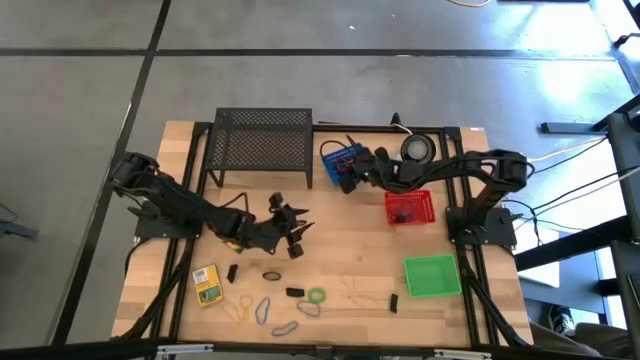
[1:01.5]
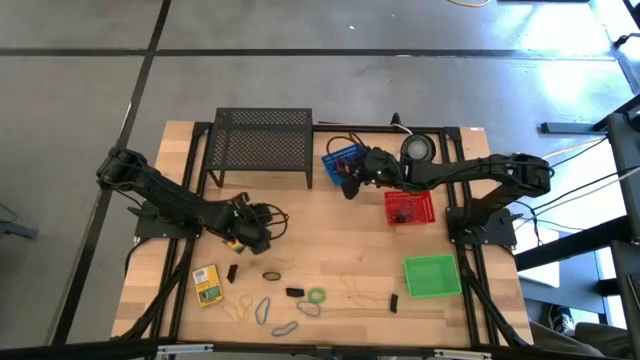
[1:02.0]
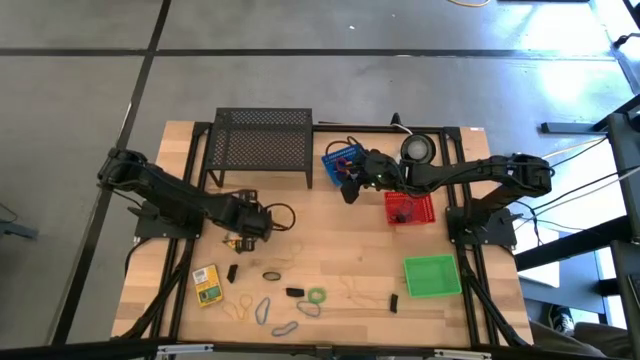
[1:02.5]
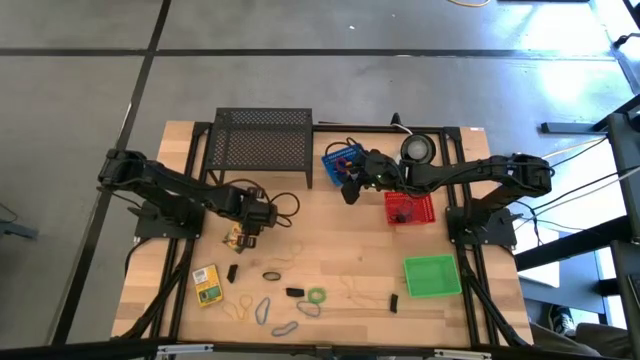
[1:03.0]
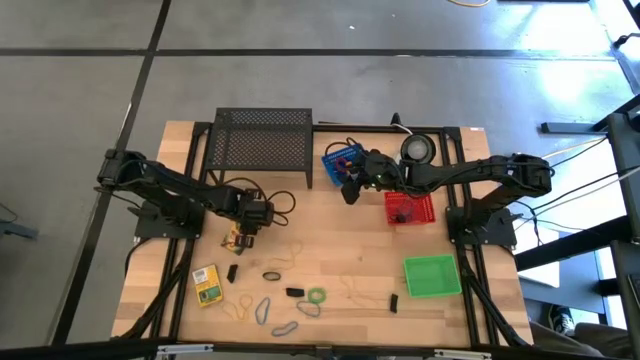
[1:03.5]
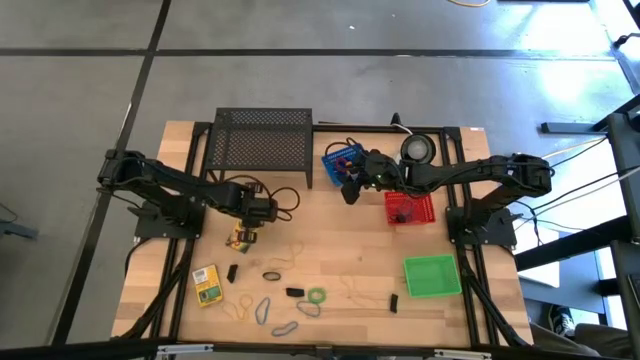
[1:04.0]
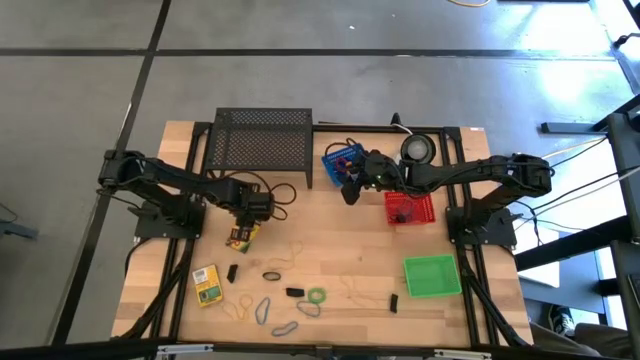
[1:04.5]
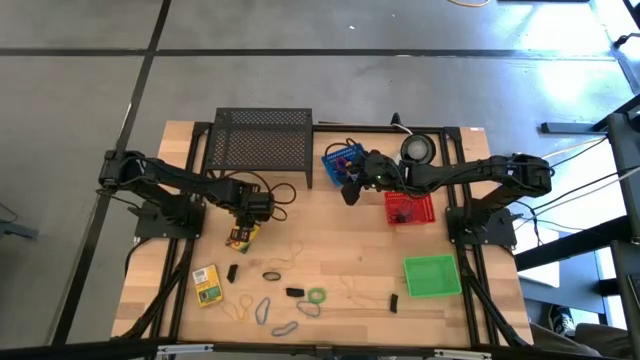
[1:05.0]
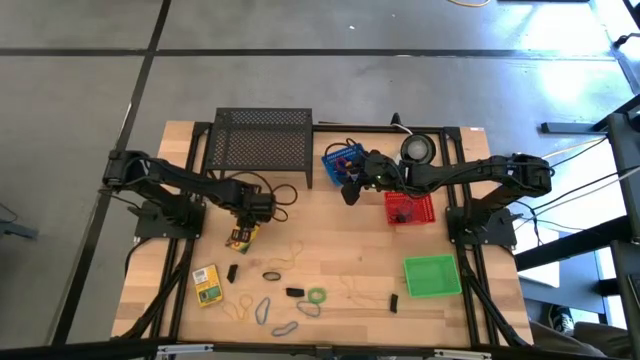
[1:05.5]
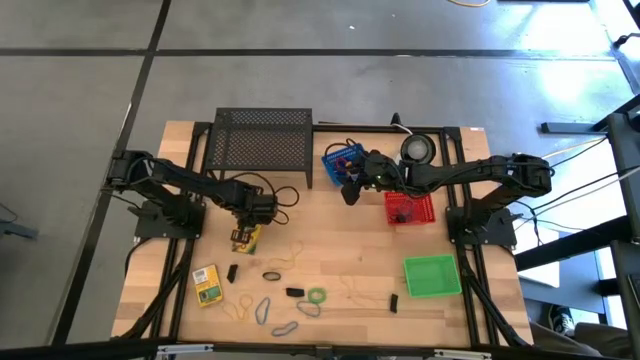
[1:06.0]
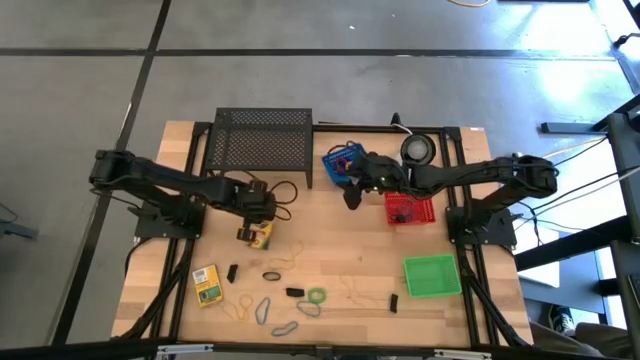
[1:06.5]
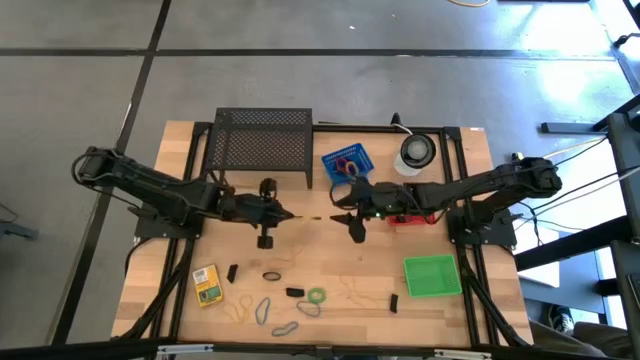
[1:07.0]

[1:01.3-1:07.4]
Task: Pick & Place Office Desk Supplies
Put the crayon box into the green bin

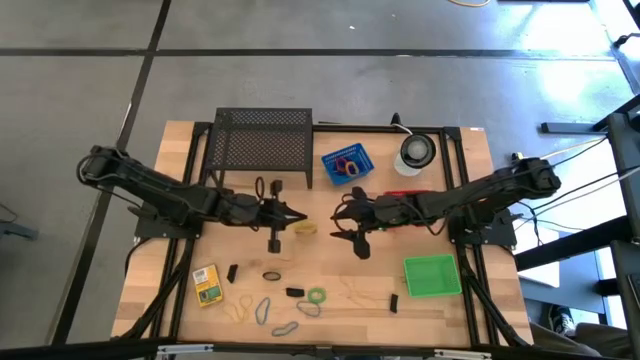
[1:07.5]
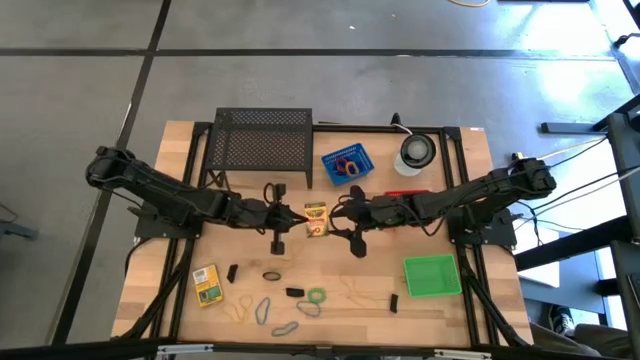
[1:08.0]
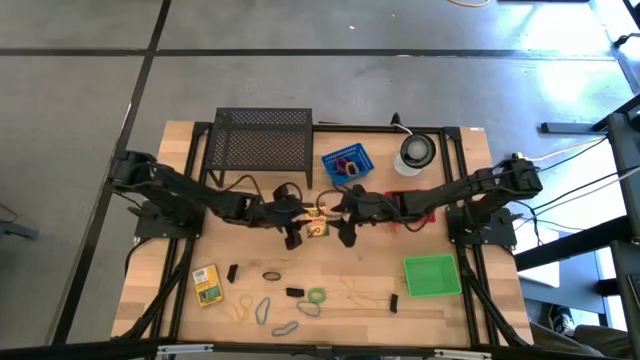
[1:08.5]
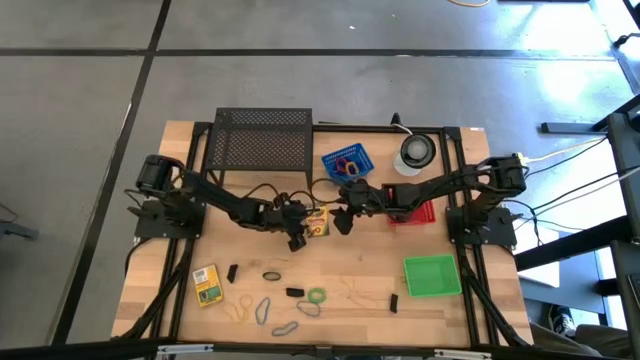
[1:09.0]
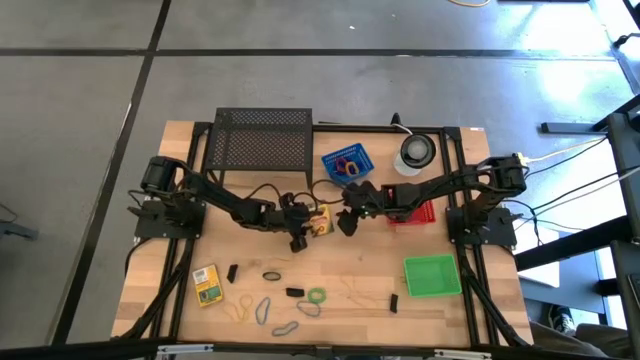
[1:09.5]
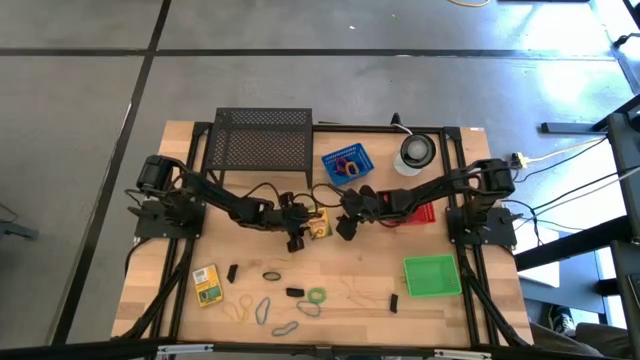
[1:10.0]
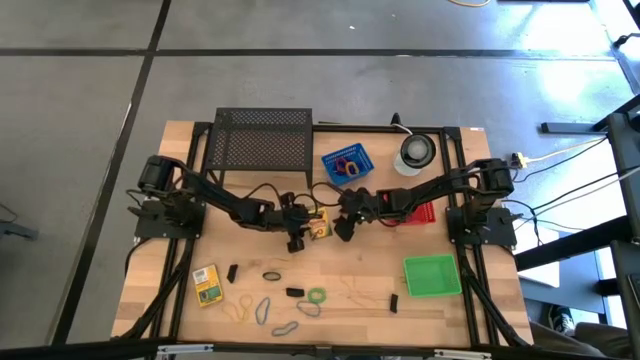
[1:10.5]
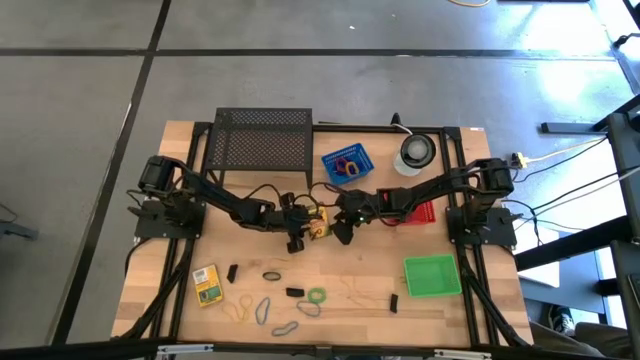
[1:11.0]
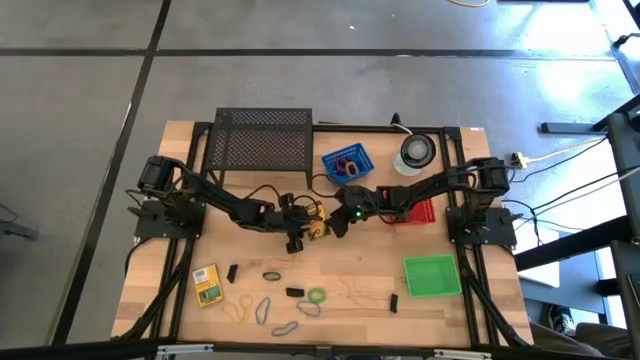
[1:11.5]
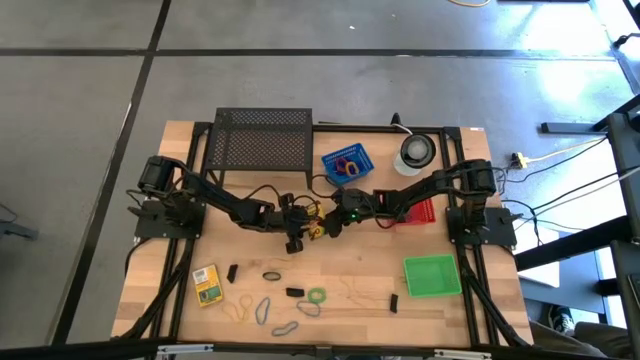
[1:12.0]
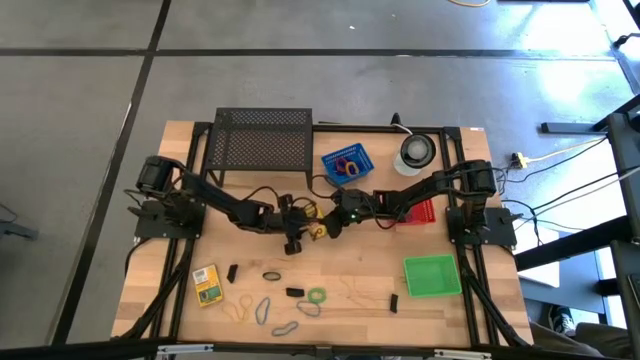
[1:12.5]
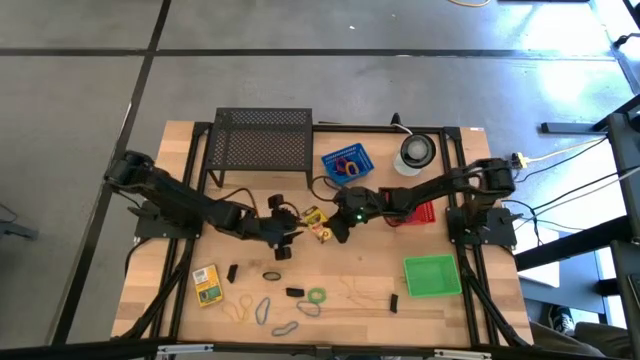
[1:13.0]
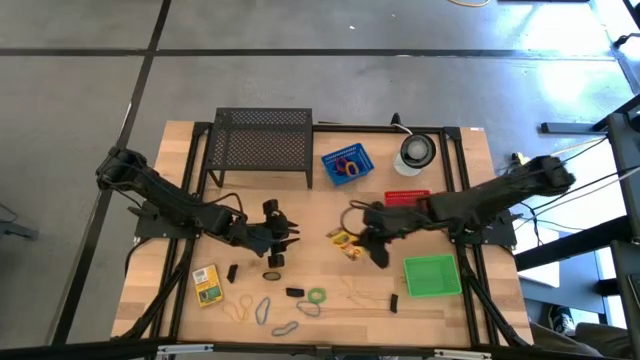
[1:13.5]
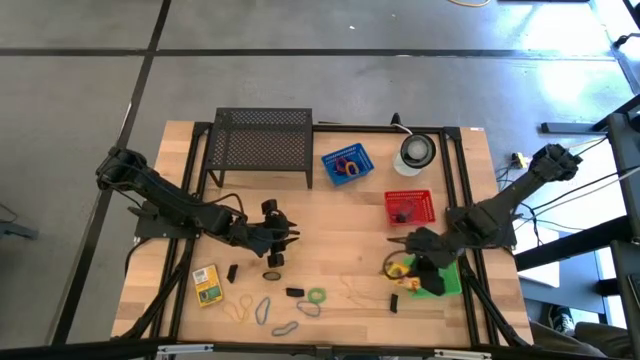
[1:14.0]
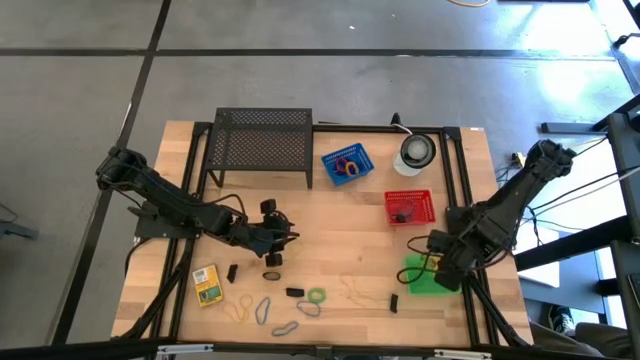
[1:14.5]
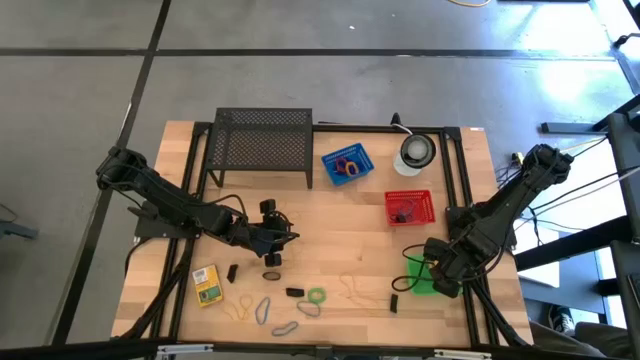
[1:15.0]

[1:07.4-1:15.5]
Put the crayon box into the green bin

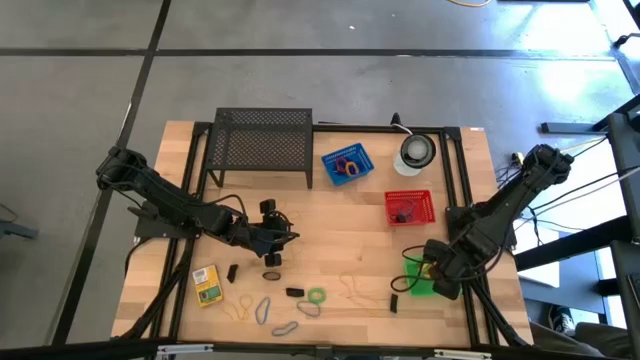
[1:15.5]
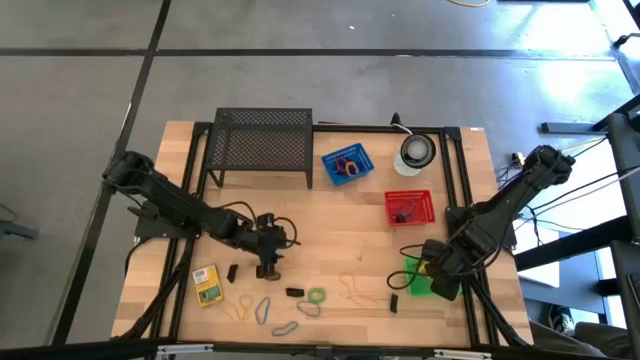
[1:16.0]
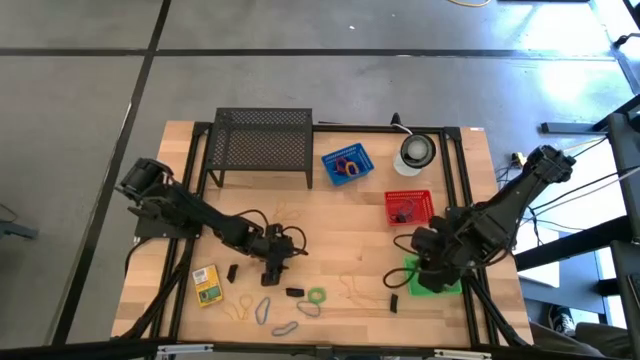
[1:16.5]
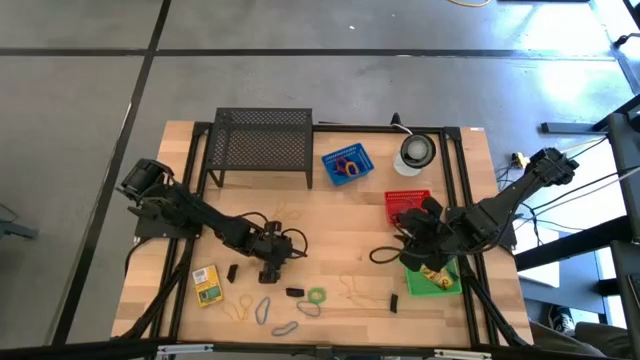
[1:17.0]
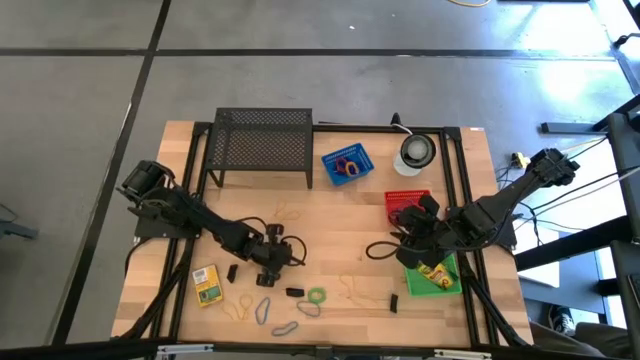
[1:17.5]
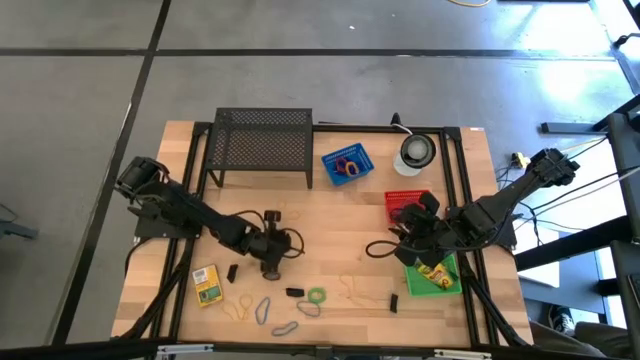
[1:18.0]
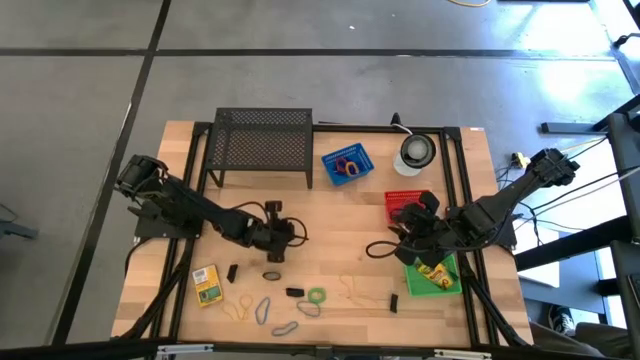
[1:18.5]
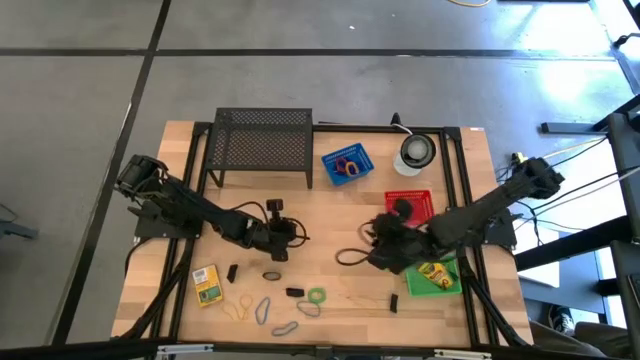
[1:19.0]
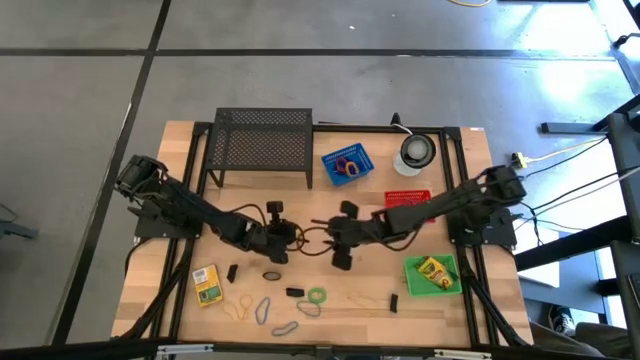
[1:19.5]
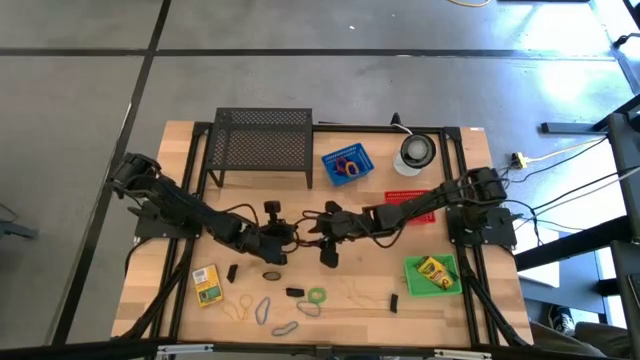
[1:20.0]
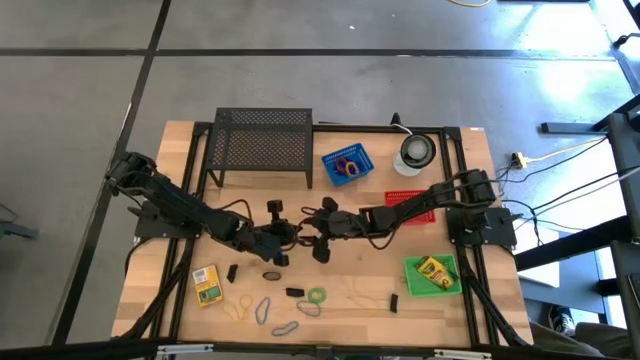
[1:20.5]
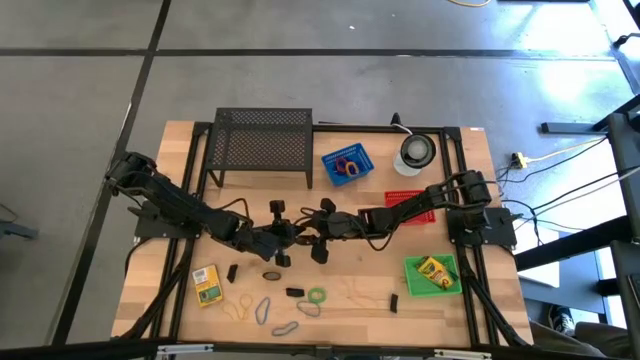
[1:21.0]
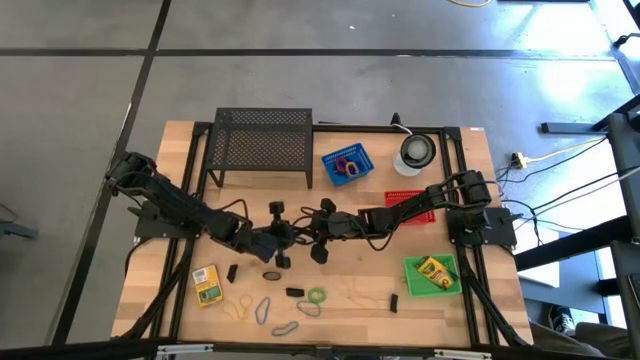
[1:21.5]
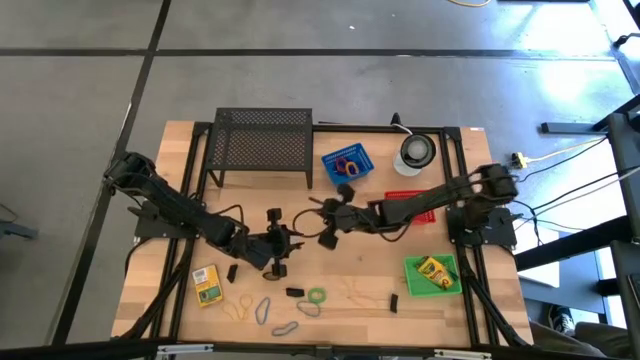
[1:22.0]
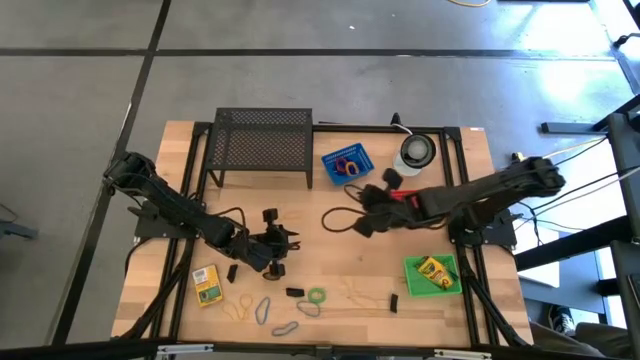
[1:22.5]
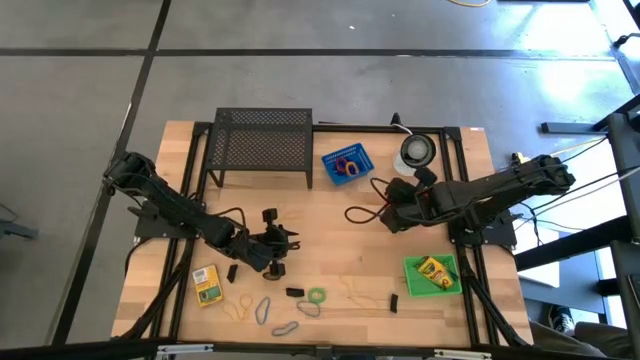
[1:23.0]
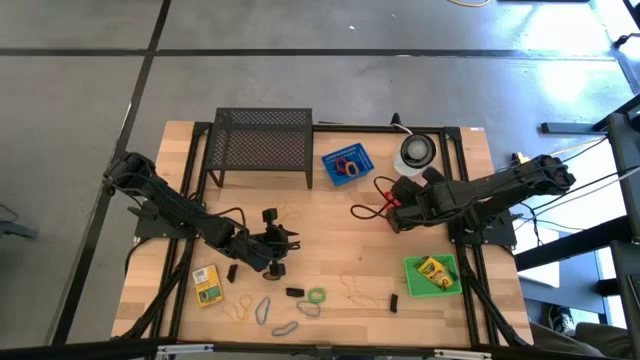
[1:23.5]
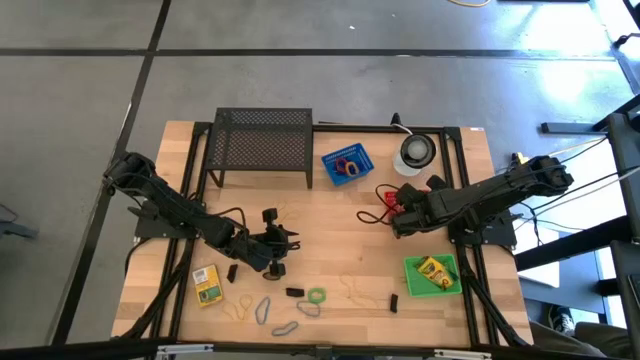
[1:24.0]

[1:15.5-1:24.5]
Put the yellow rubber band into the red bin
